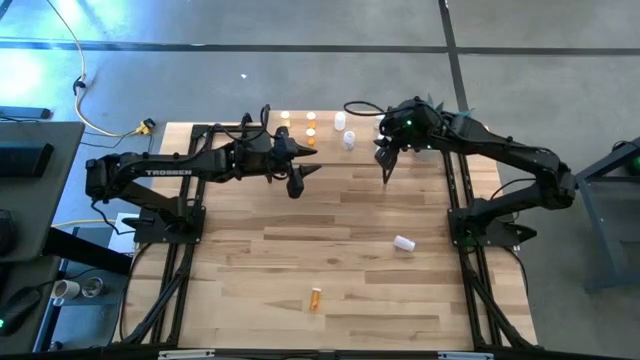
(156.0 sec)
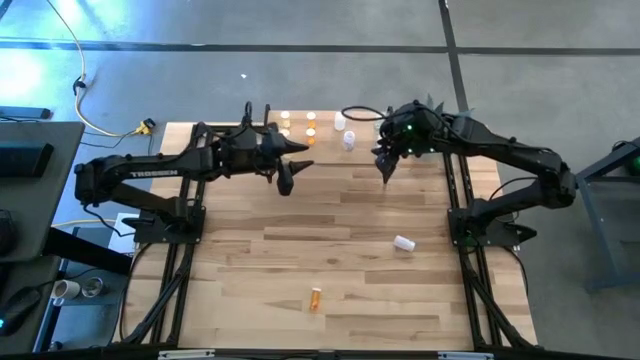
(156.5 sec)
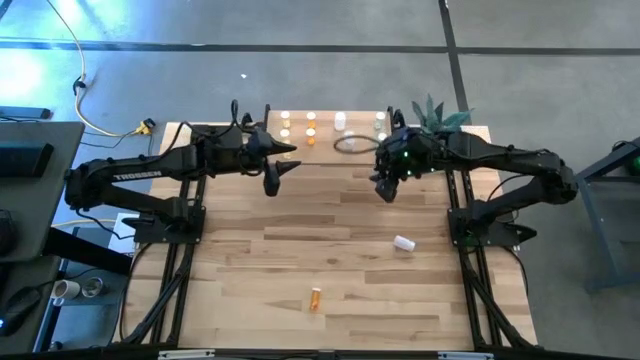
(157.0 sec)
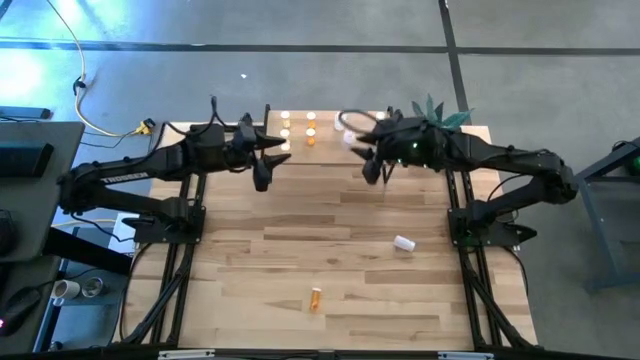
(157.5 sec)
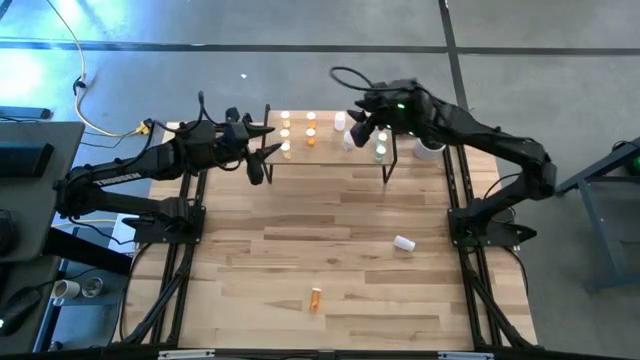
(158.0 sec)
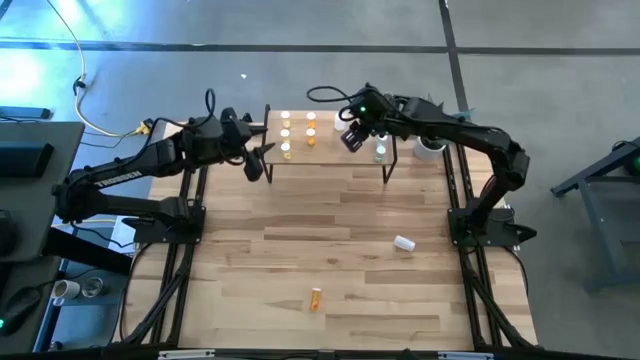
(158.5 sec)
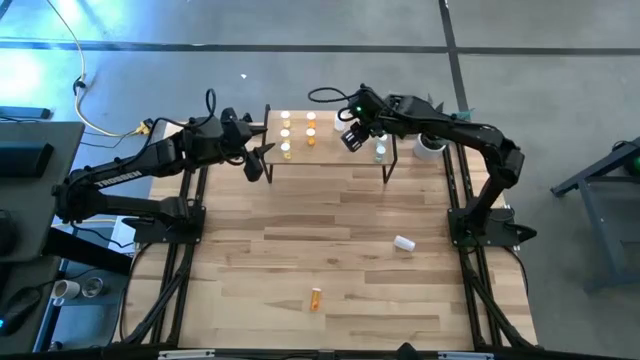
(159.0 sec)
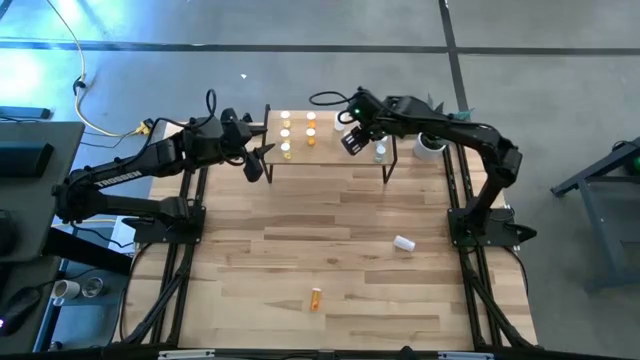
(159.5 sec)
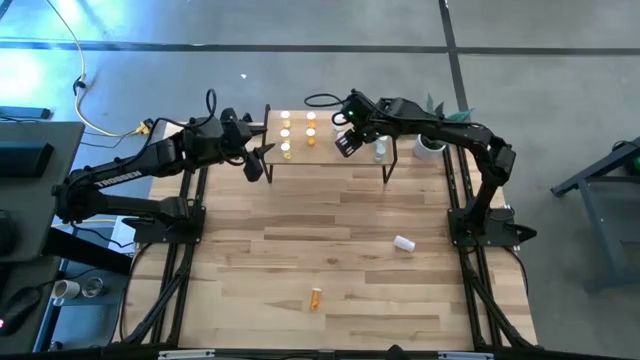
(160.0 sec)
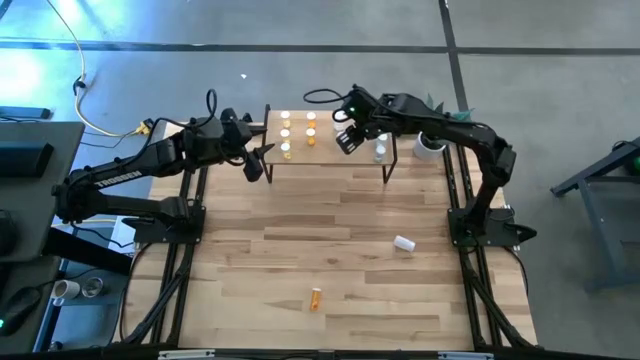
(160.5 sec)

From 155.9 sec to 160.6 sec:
Task: Pick and place medicine bottles onto shelf by color
Adjust the bottom white pill bottle on the shelf

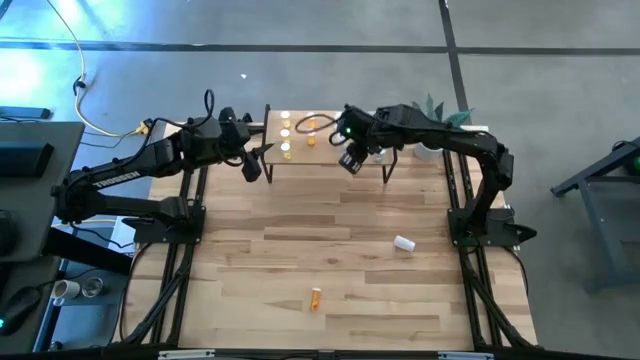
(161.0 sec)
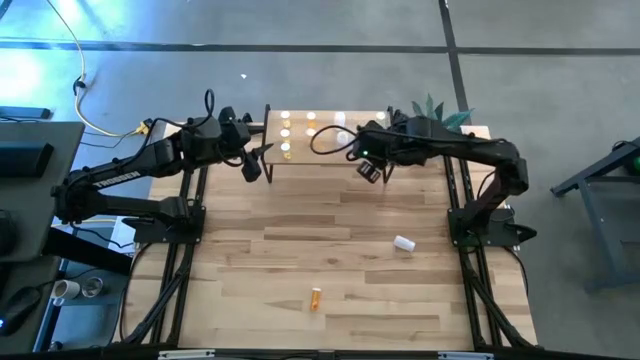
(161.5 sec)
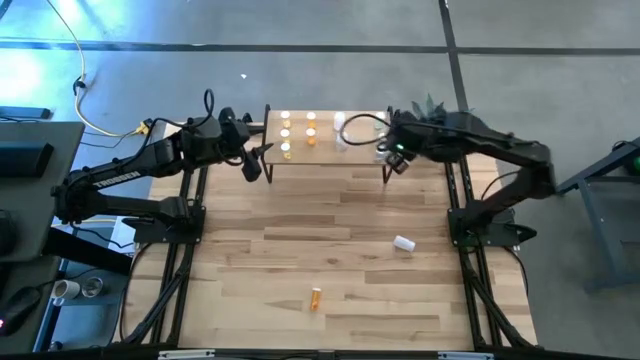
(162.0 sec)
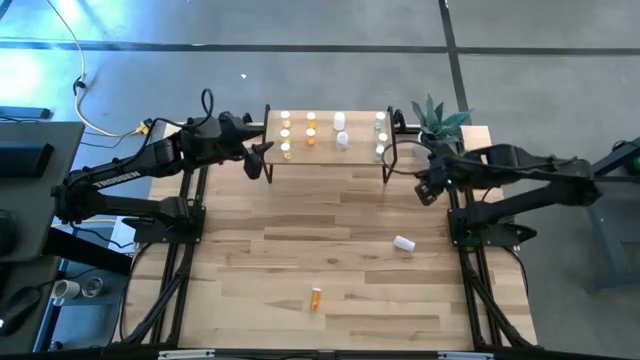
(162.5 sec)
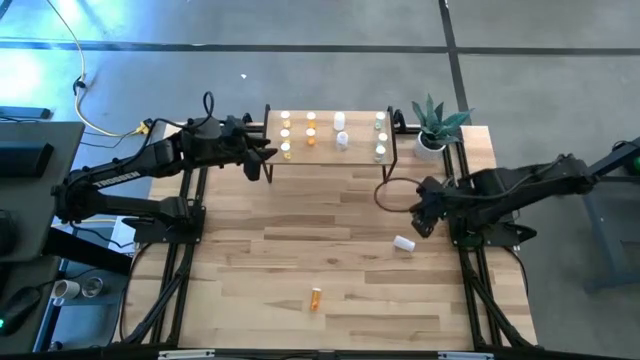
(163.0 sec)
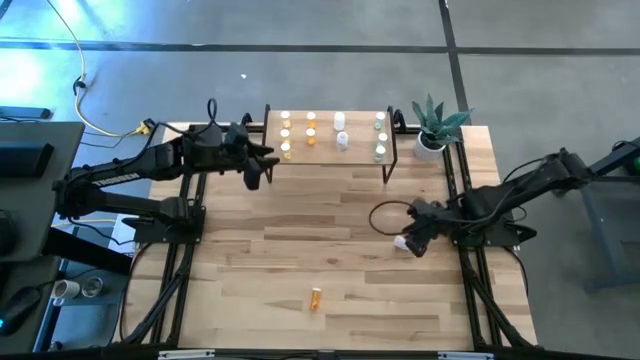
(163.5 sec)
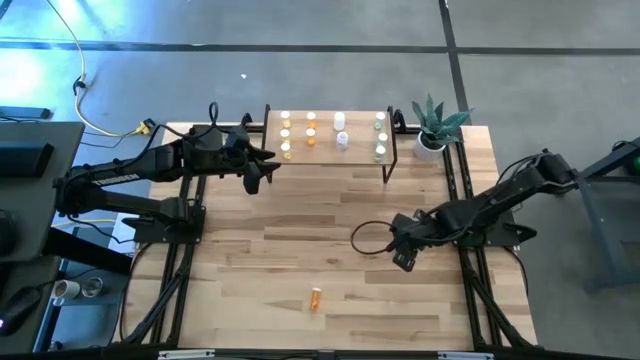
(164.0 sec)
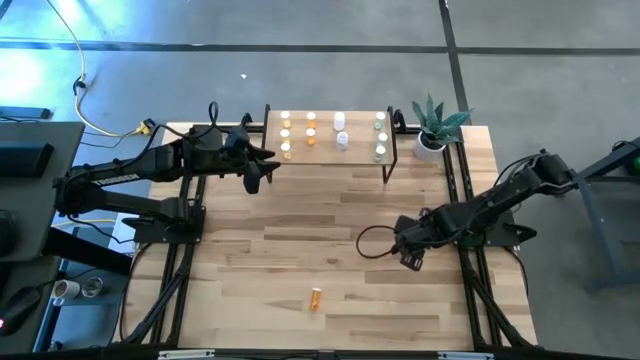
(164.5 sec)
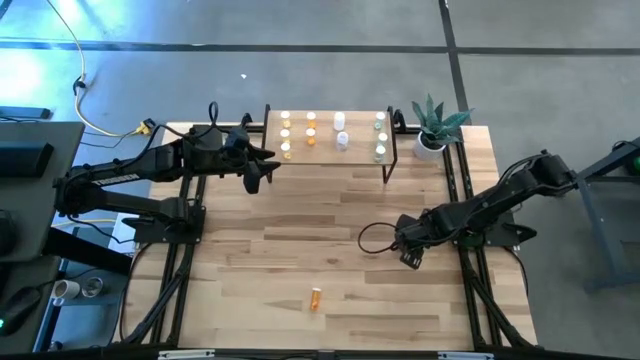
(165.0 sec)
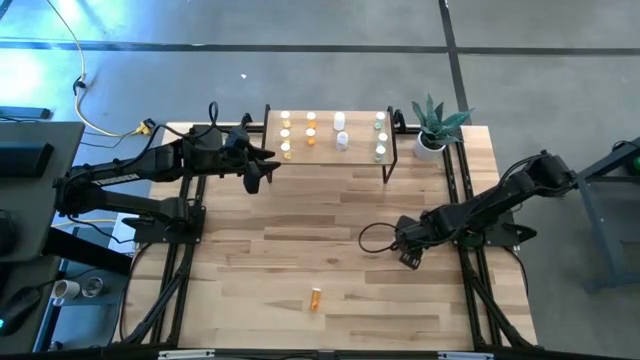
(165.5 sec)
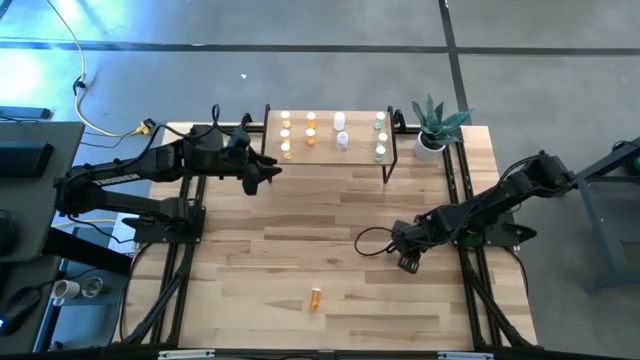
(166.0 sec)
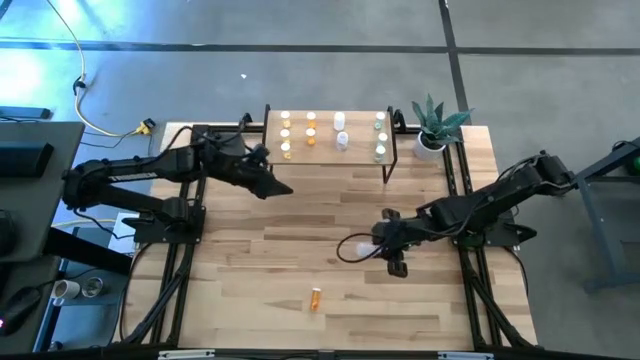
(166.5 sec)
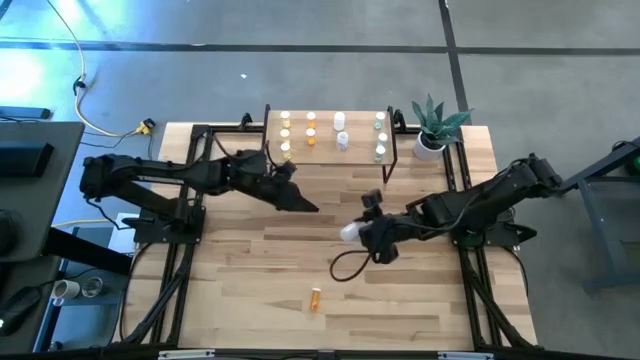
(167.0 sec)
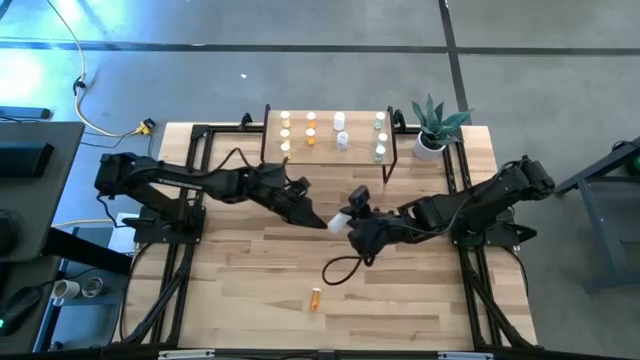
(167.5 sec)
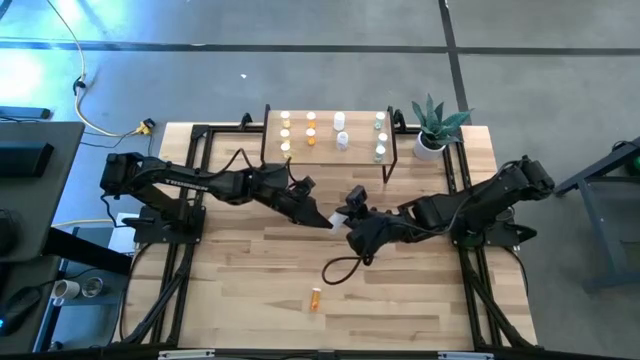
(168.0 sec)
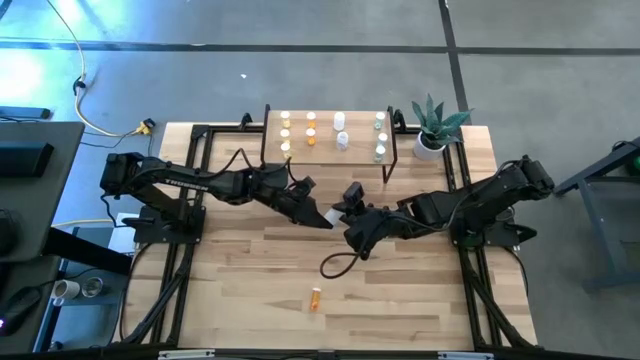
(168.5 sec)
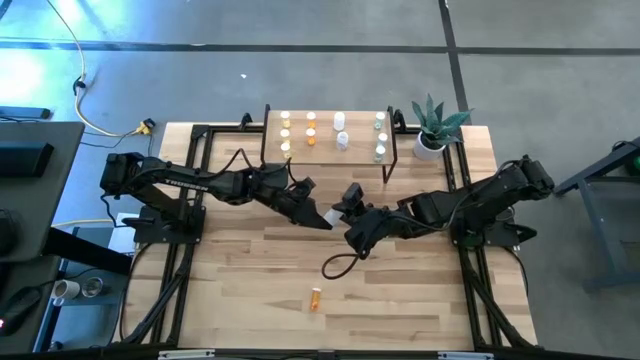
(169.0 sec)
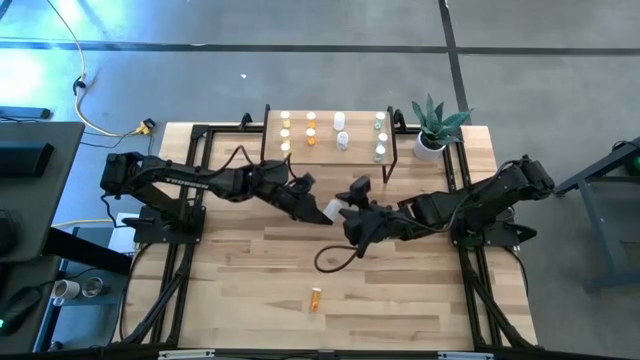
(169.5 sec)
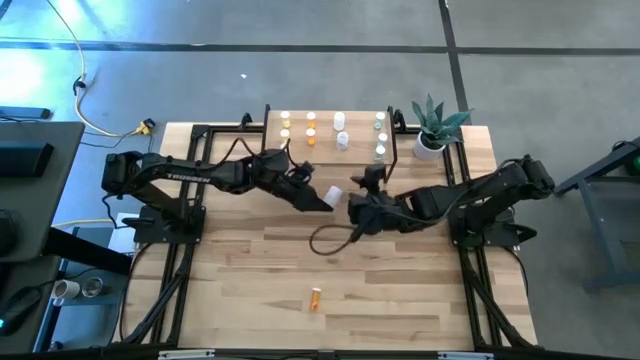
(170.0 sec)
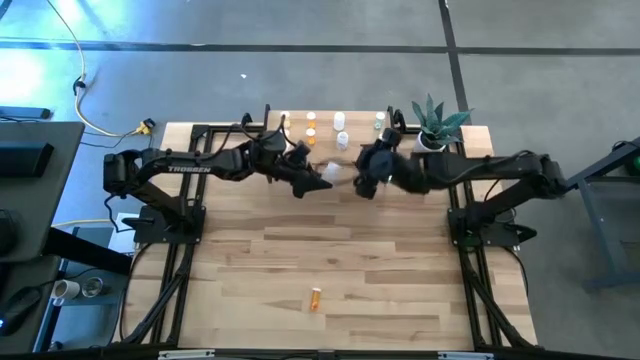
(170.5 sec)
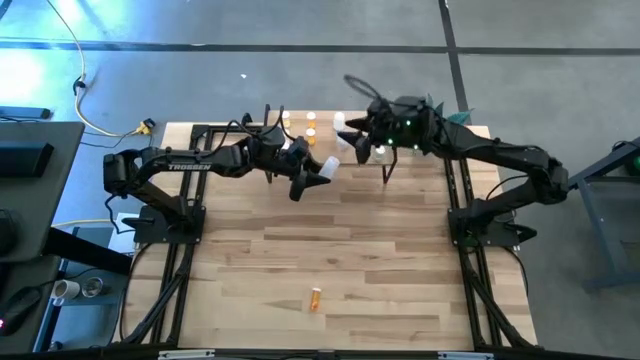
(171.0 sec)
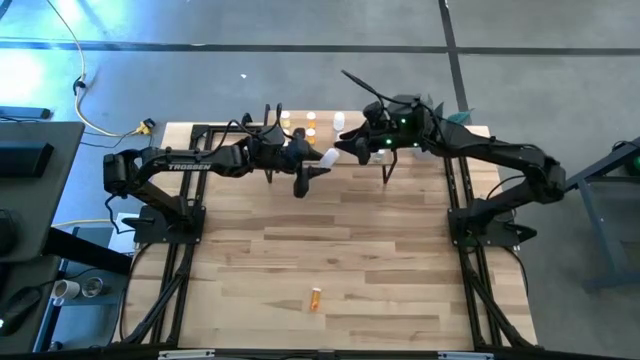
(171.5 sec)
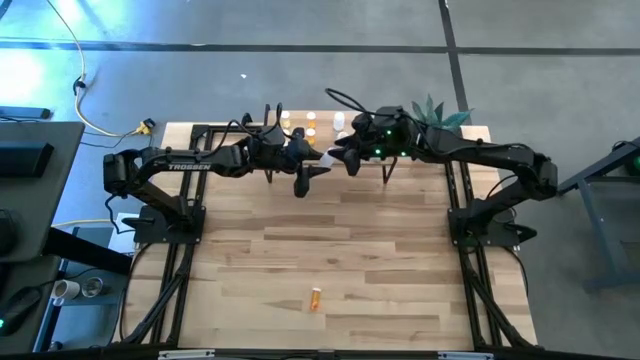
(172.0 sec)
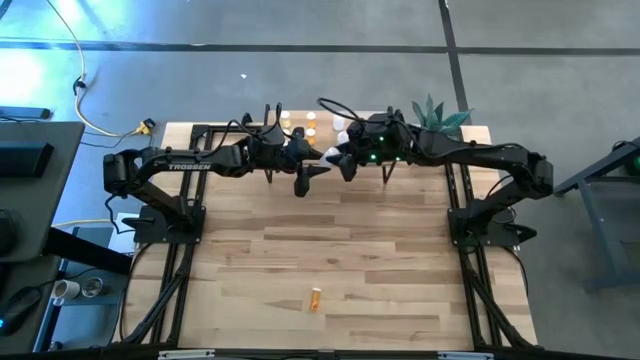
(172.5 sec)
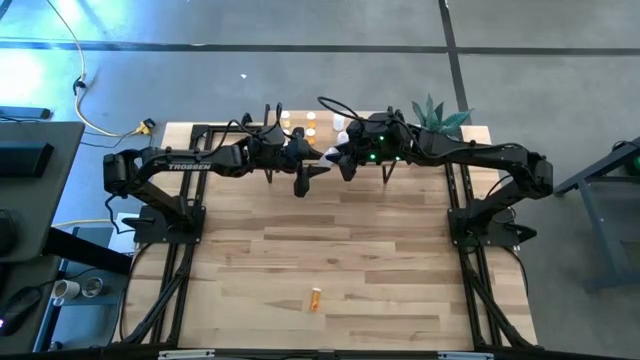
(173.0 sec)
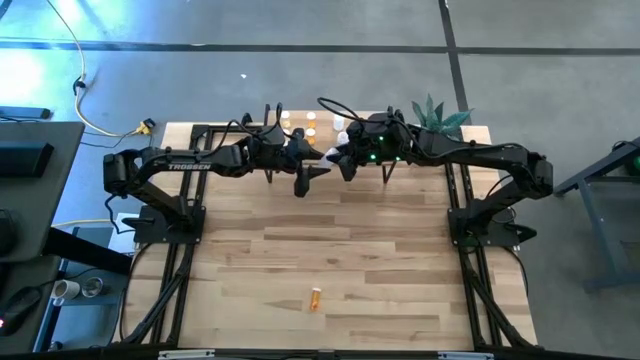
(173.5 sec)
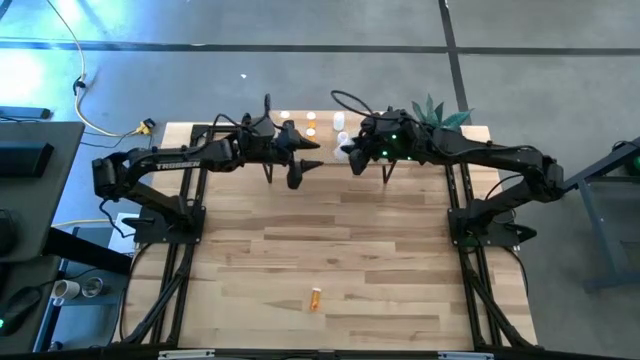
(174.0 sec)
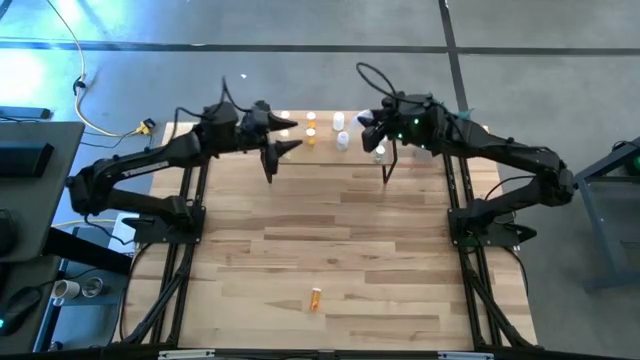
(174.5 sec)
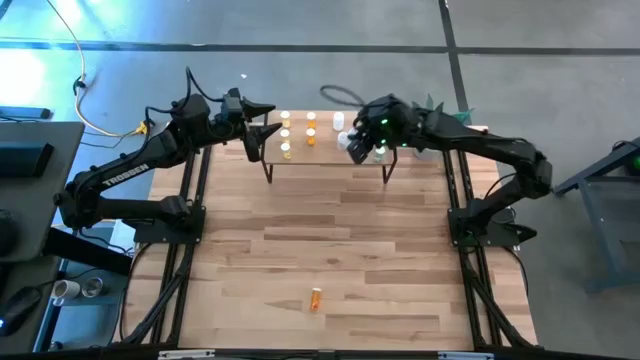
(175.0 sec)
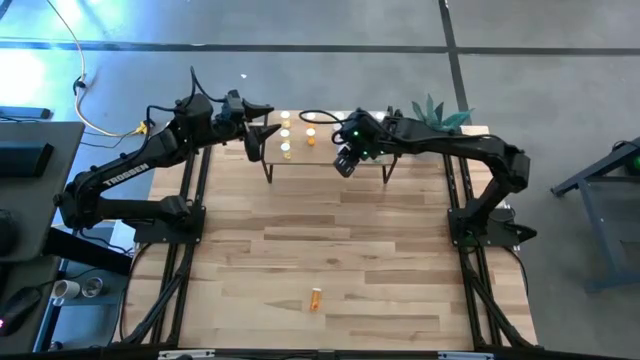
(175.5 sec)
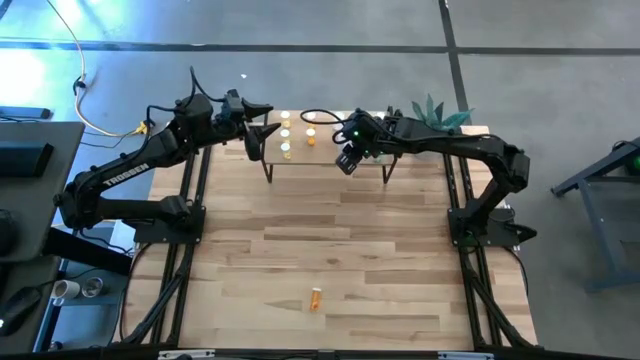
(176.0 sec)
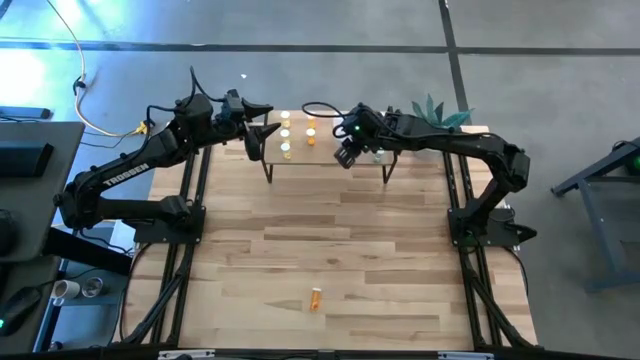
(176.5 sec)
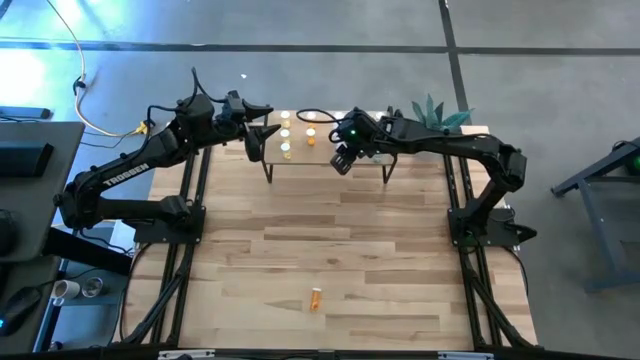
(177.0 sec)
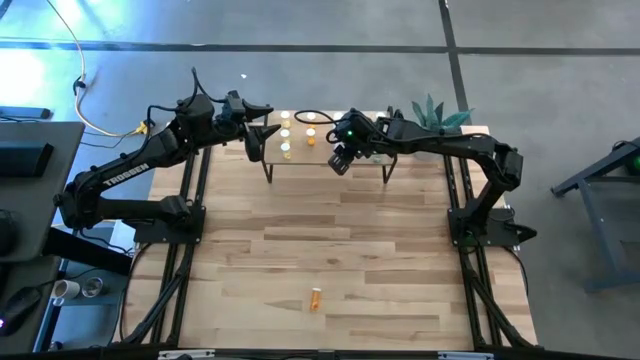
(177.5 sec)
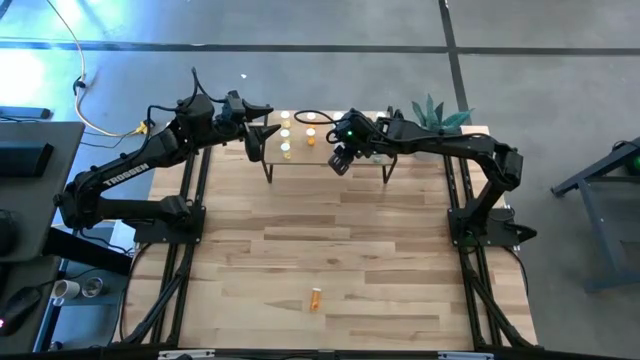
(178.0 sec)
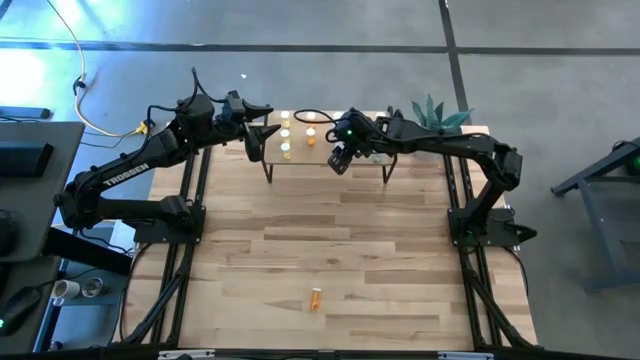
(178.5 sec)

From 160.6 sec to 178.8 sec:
Put the white pill bottle on the shelf and align it to the other white pill bottle
